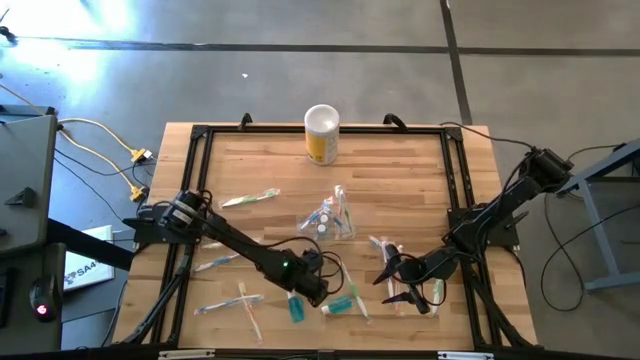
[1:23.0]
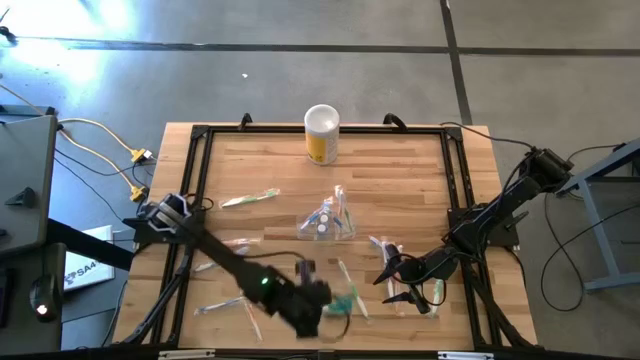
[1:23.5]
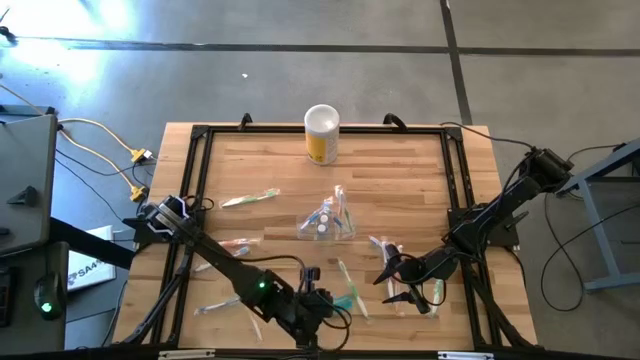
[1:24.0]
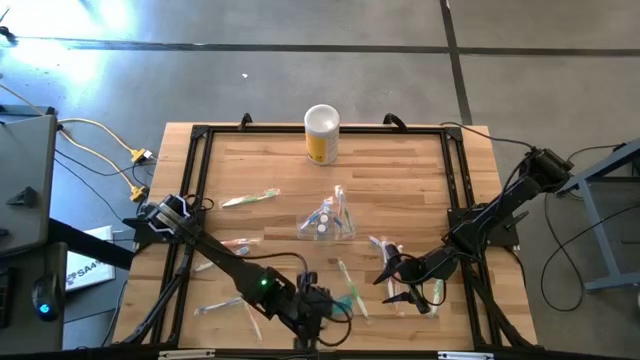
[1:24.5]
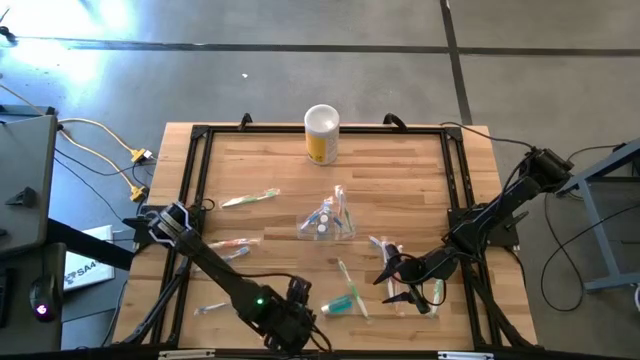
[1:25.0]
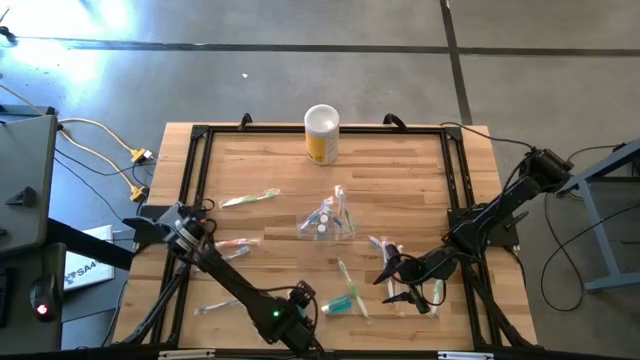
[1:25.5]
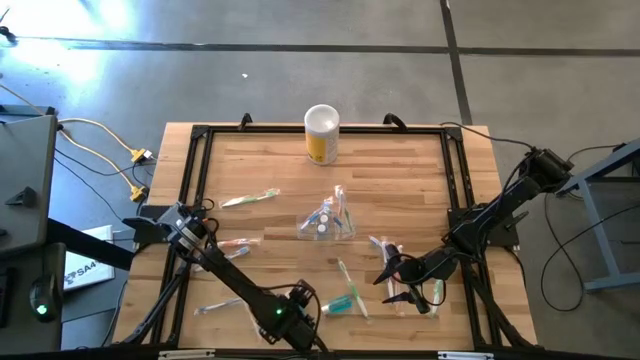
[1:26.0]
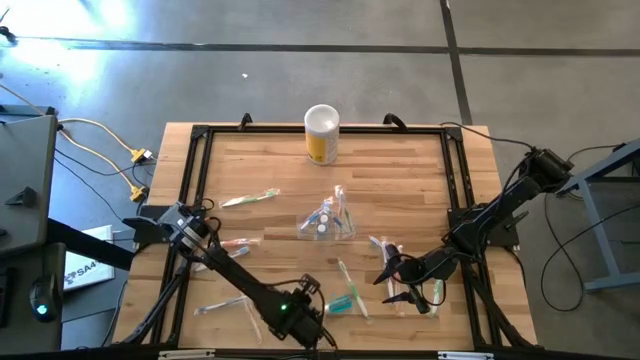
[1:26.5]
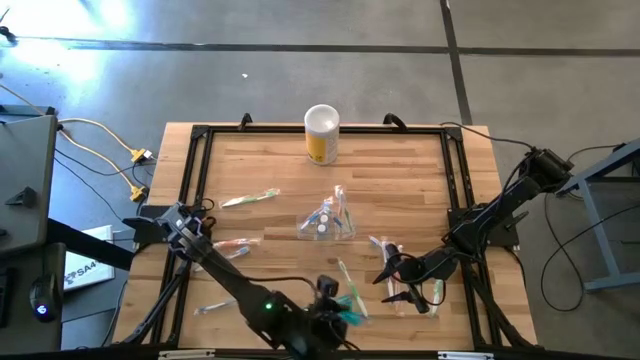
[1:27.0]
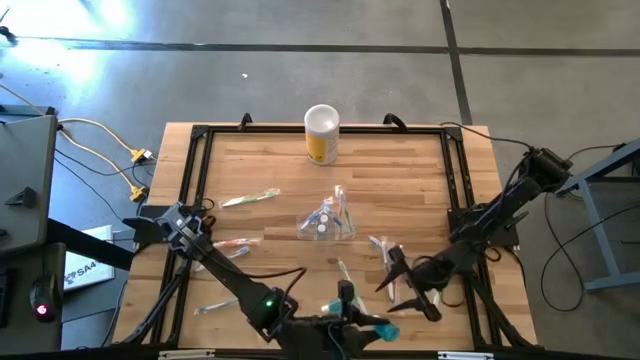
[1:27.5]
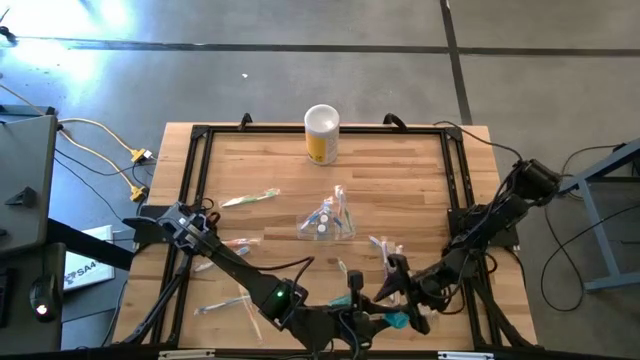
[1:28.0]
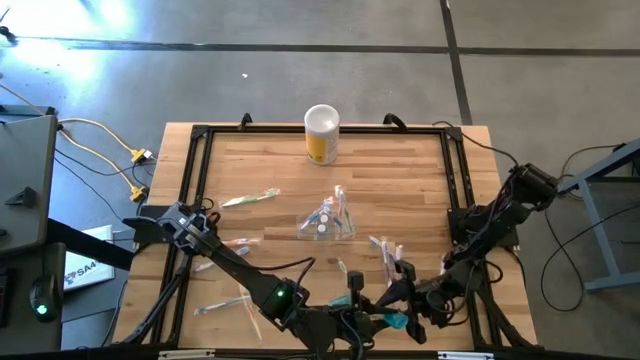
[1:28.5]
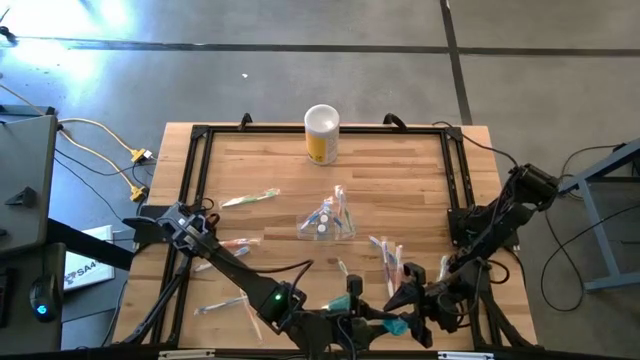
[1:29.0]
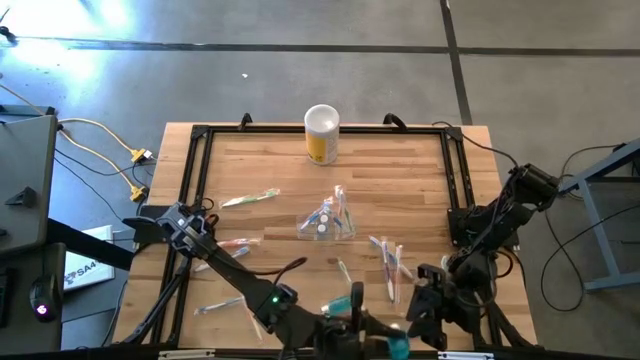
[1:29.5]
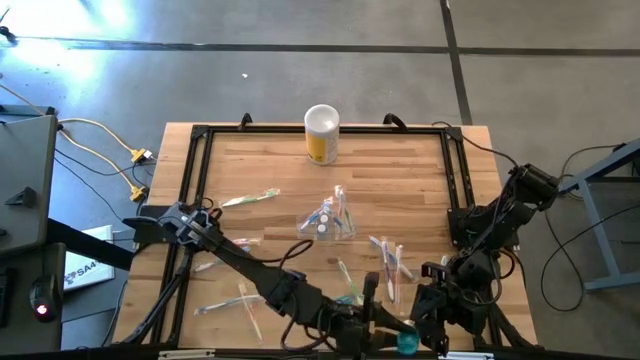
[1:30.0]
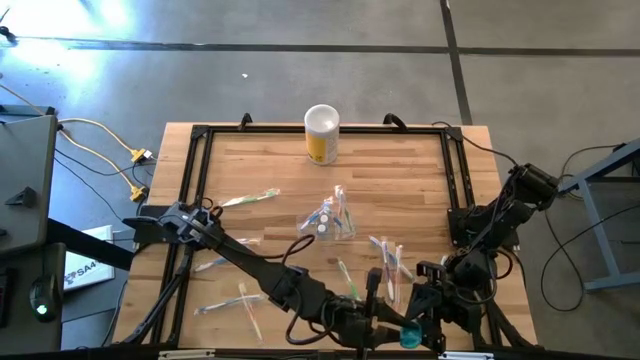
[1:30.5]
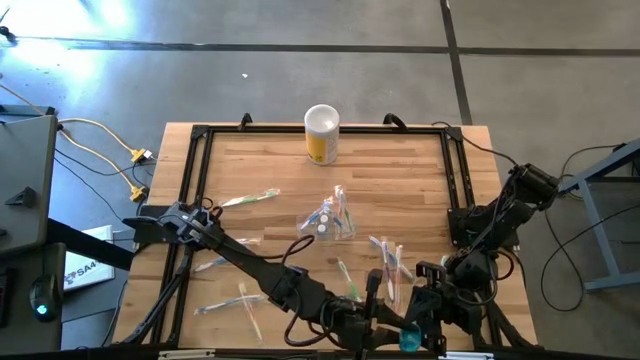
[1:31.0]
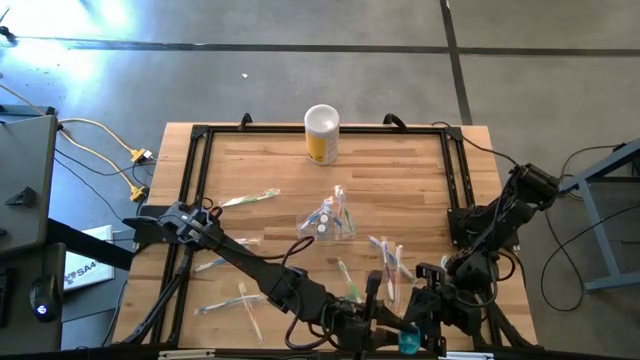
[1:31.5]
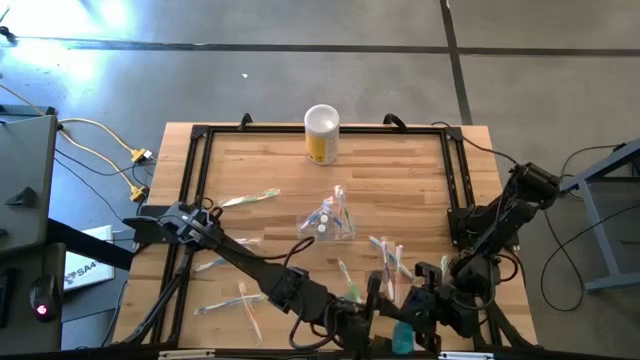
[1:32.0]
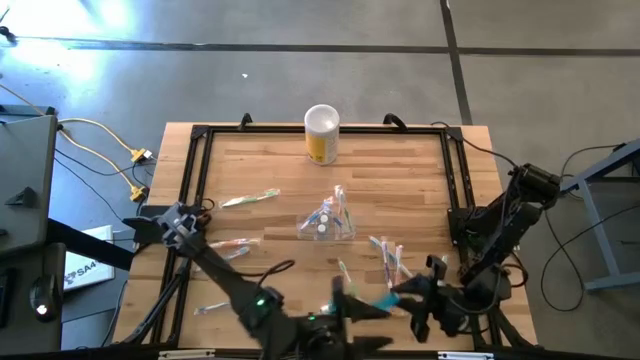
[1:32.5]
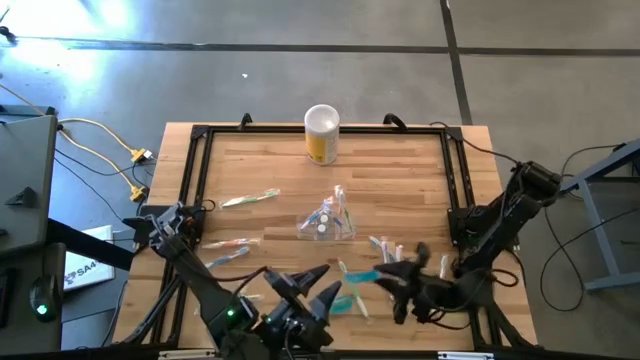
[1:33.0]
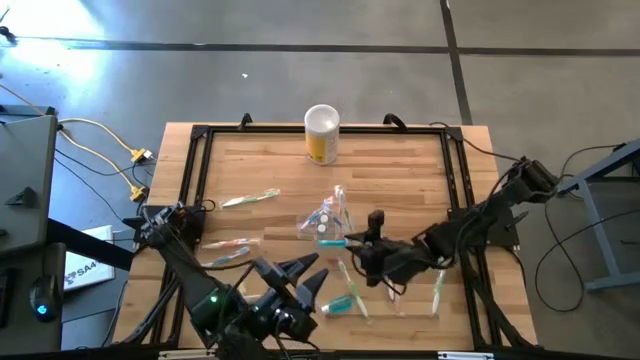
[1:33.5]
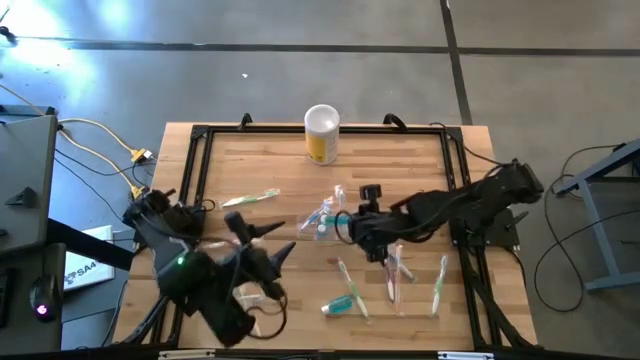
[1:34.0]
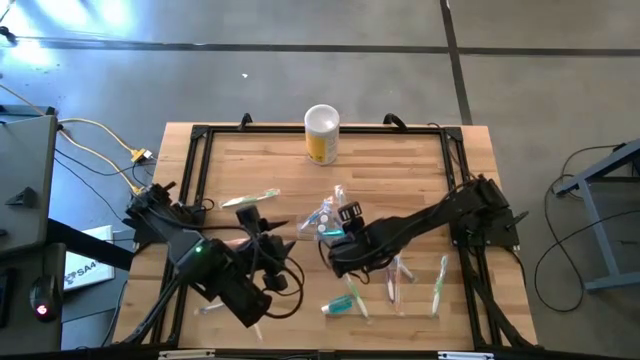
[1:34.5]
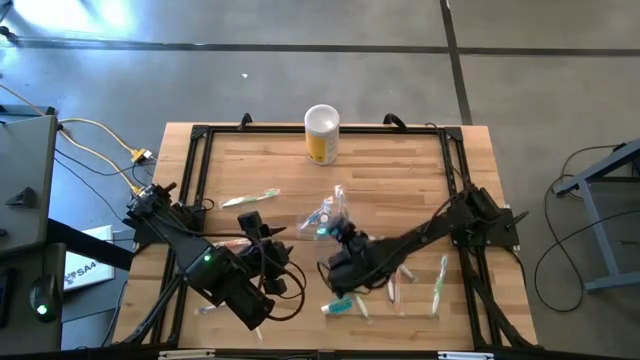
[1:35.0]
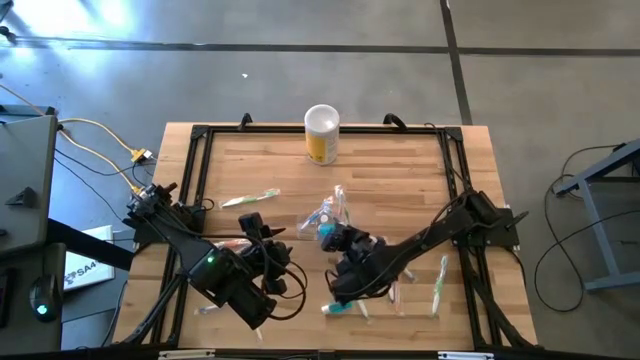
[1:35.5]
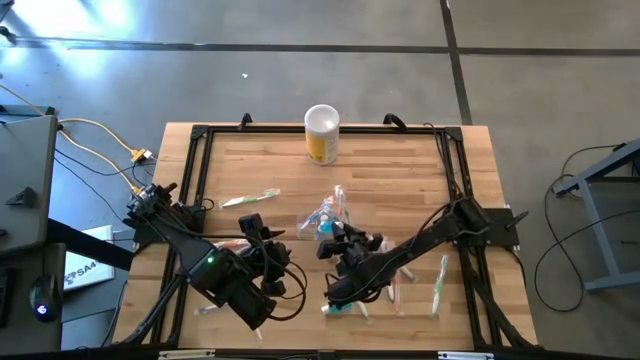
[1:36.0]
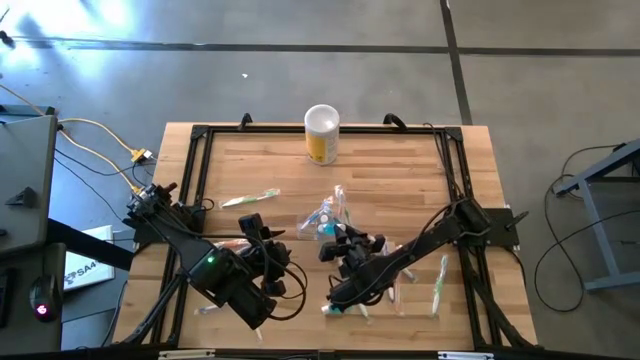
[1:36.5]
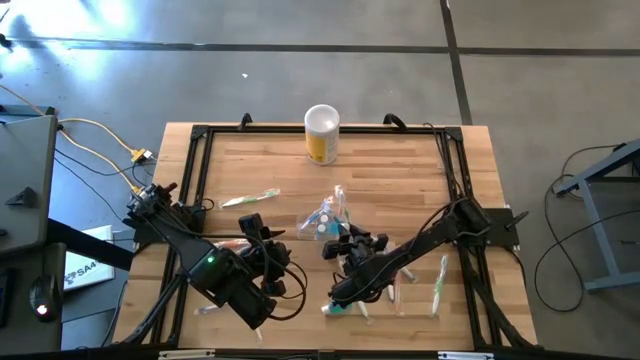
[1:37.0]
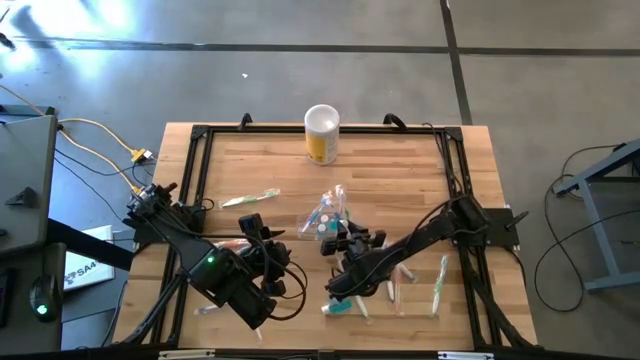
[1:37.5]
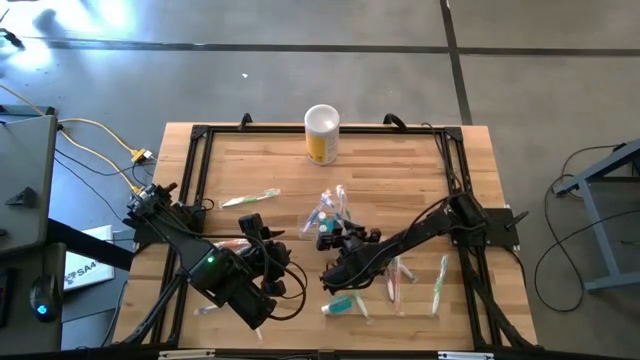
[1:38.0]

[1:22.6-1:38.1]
Task: Pick & Place toothbrushing station
Put the blue mouthwash into the middle part of the transparent organizer

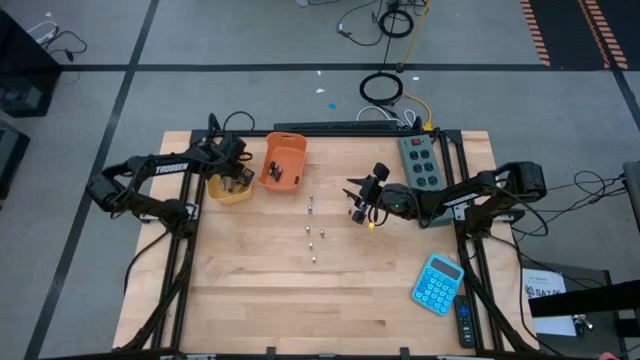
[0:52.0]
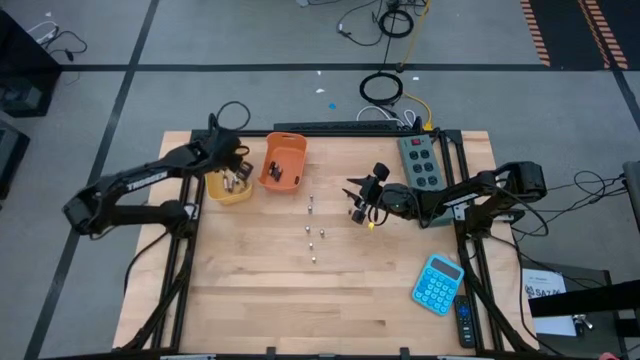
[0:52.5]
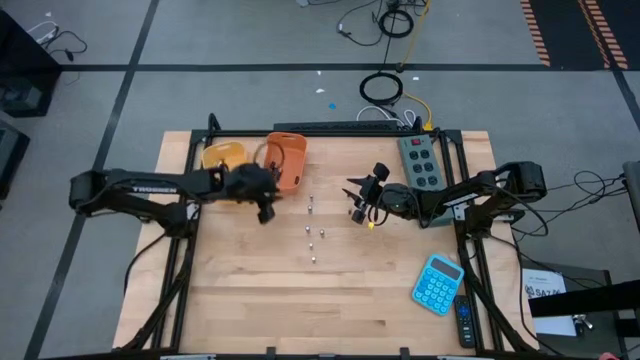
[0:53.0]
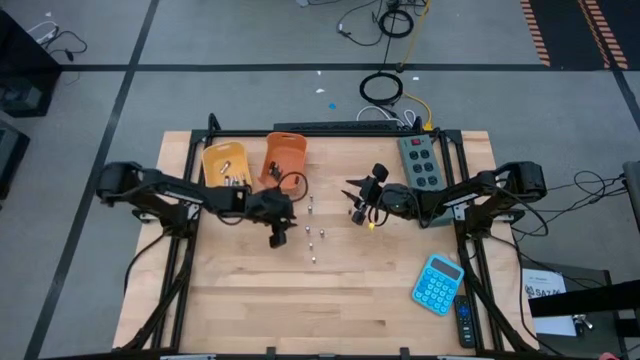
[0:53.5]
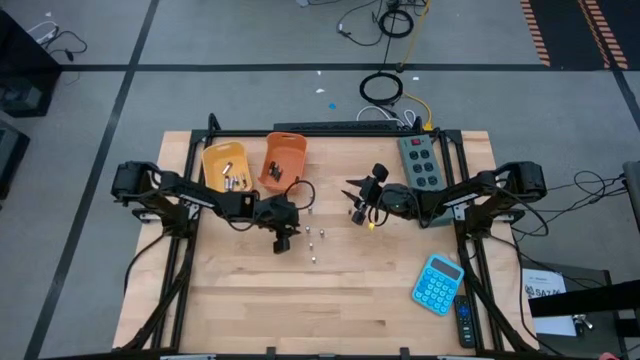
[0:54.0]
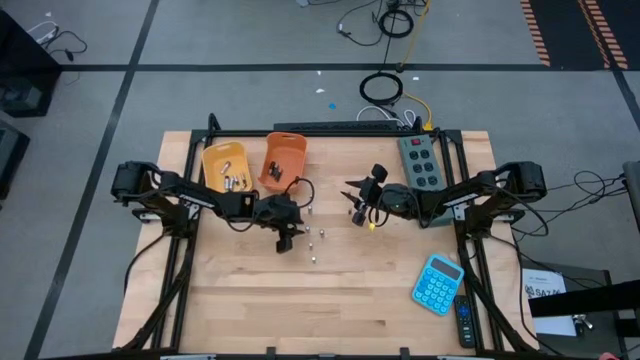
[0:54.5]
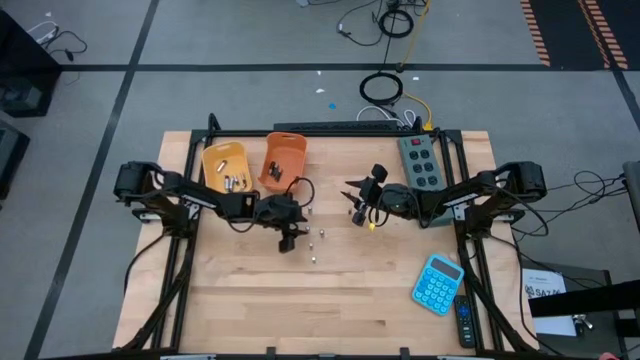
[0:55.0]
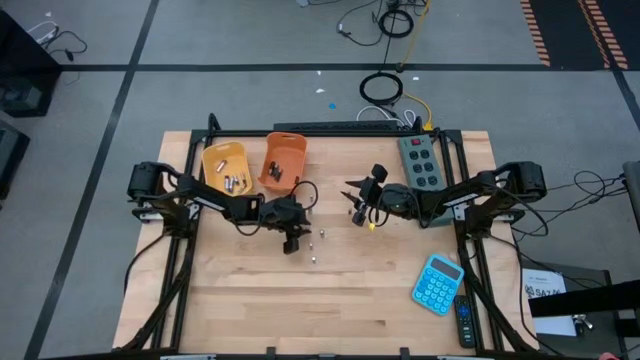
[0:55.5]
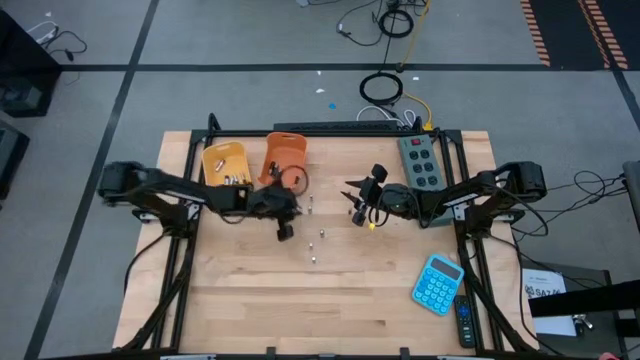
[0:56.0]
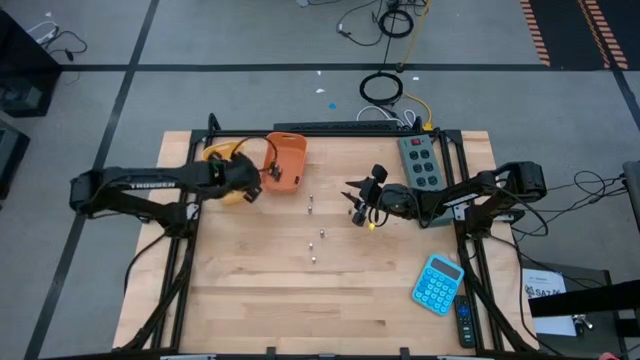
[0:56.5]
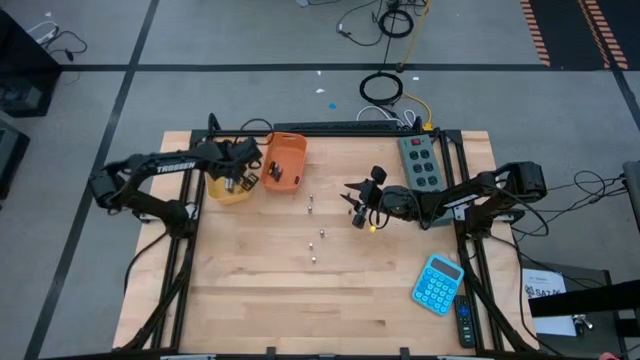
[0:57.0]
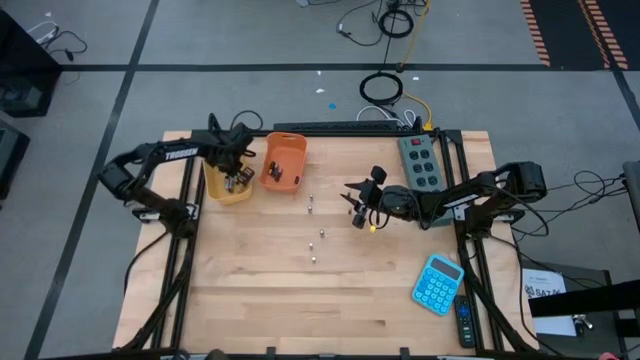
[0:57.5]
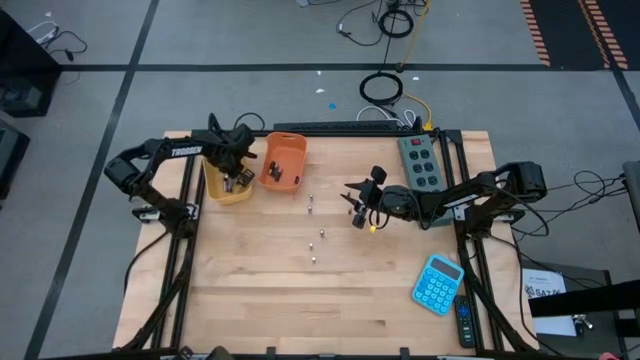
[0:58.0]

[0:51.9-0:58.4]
Task: Sort batteries
Put the silver battery into the yellow bin
